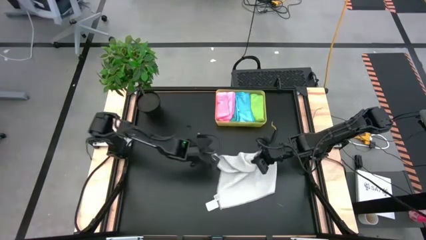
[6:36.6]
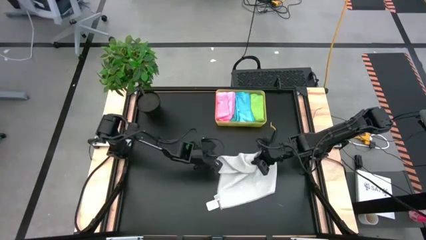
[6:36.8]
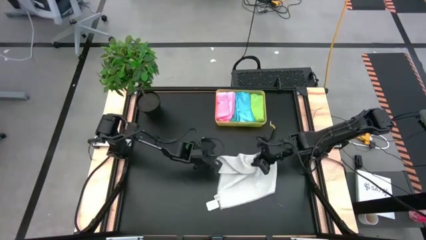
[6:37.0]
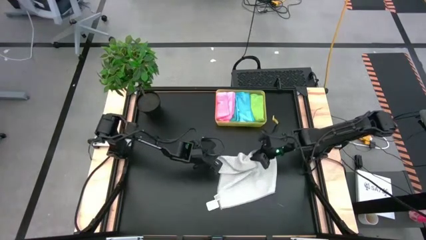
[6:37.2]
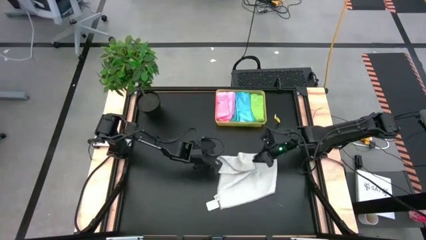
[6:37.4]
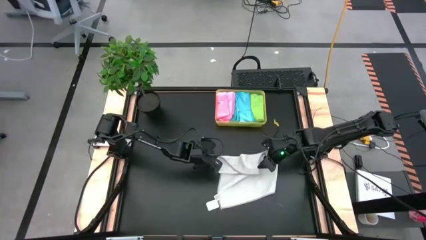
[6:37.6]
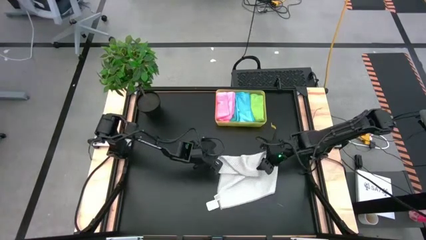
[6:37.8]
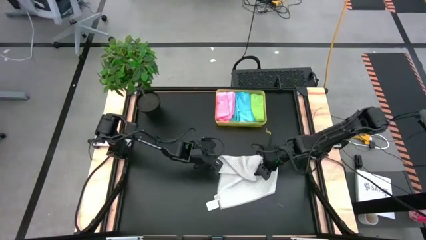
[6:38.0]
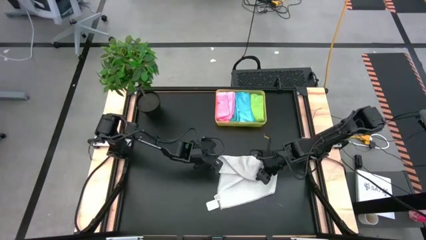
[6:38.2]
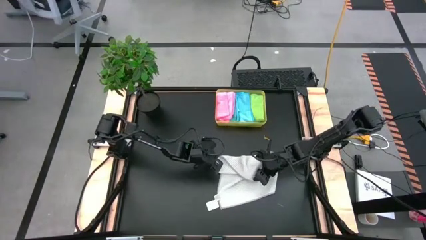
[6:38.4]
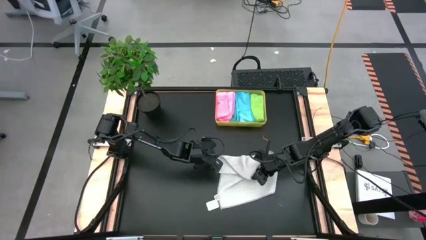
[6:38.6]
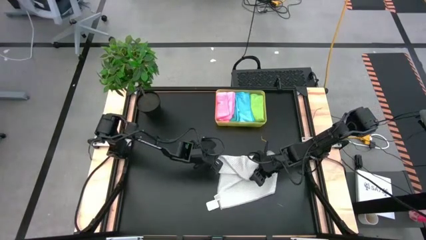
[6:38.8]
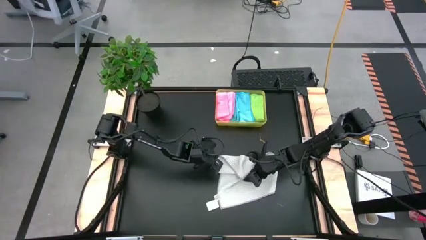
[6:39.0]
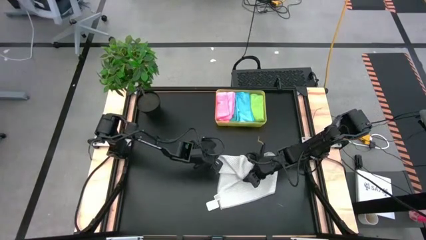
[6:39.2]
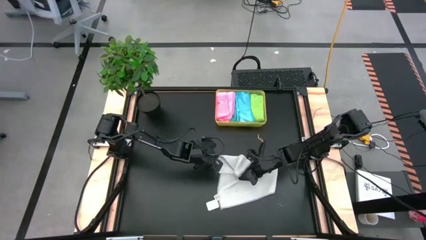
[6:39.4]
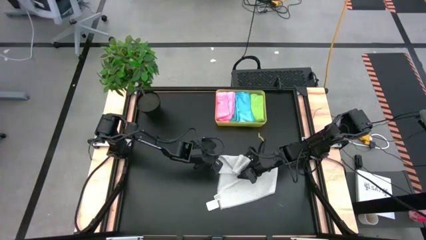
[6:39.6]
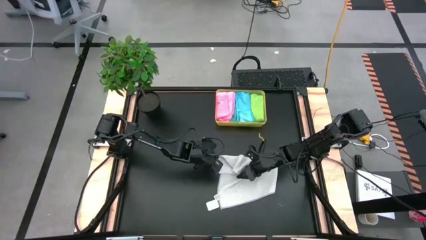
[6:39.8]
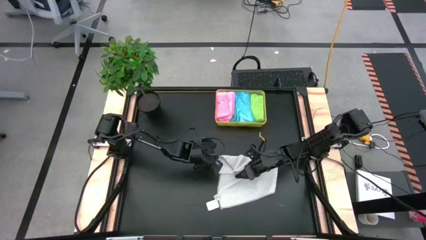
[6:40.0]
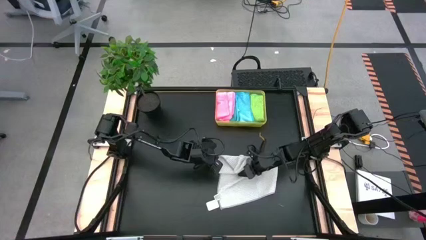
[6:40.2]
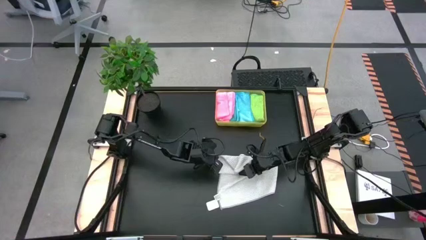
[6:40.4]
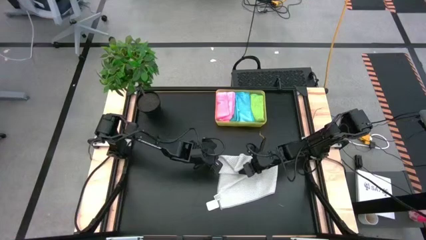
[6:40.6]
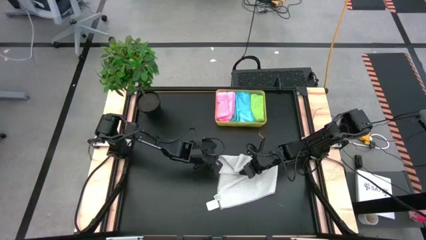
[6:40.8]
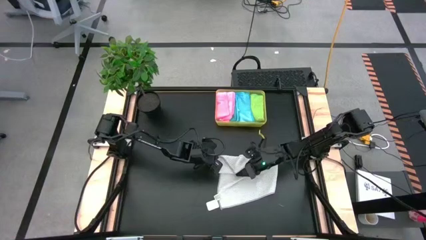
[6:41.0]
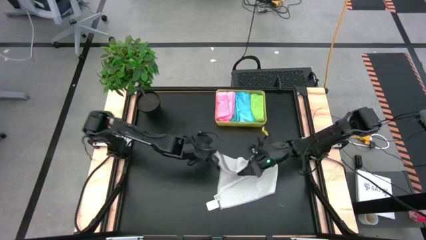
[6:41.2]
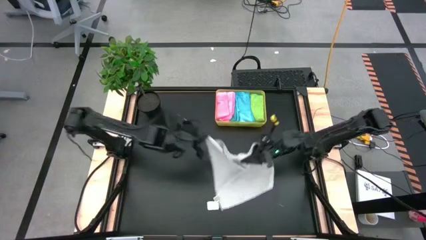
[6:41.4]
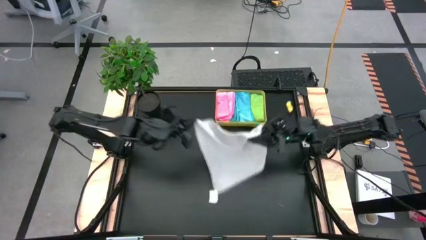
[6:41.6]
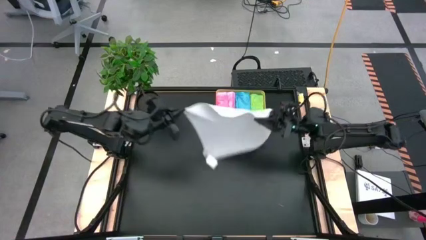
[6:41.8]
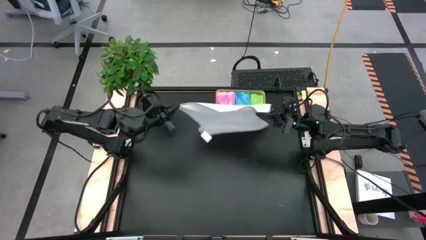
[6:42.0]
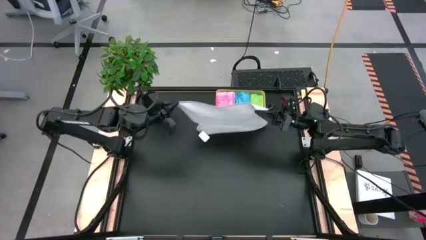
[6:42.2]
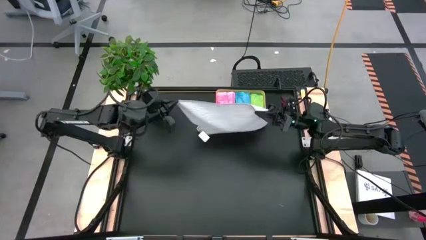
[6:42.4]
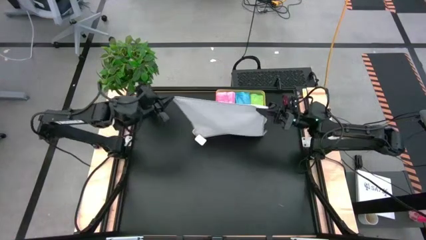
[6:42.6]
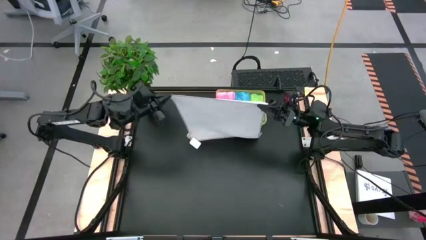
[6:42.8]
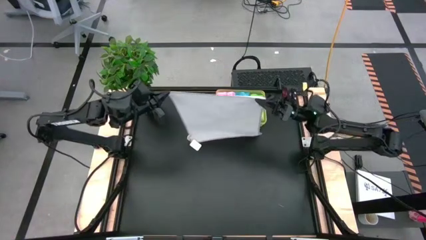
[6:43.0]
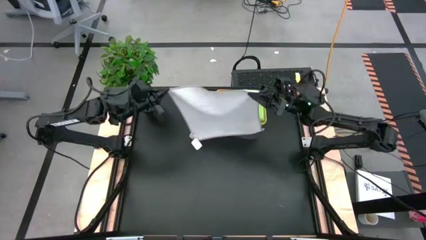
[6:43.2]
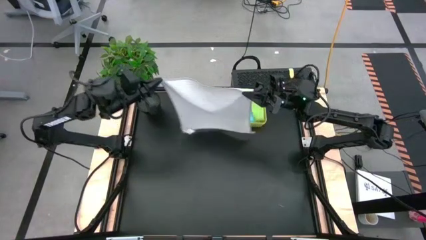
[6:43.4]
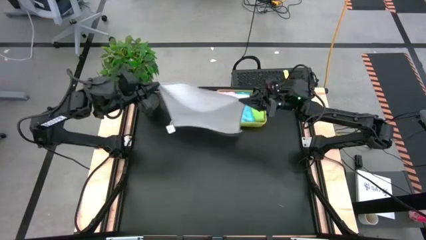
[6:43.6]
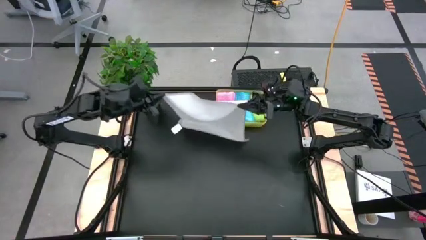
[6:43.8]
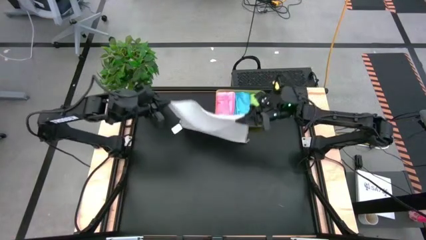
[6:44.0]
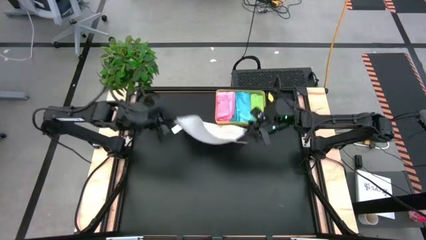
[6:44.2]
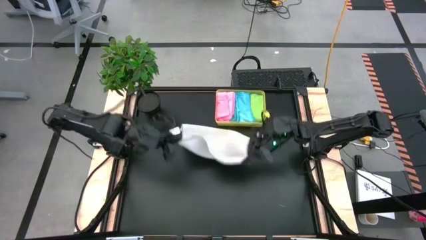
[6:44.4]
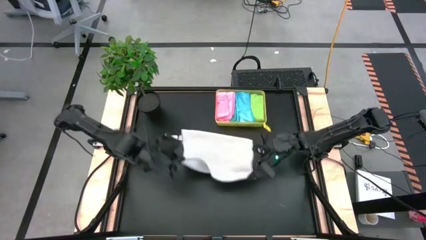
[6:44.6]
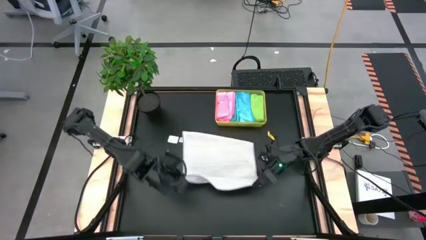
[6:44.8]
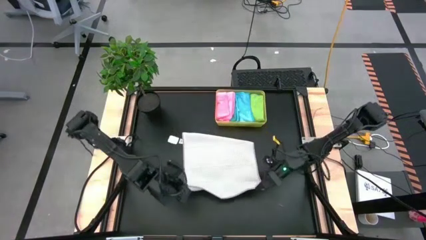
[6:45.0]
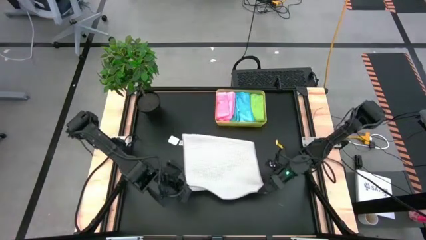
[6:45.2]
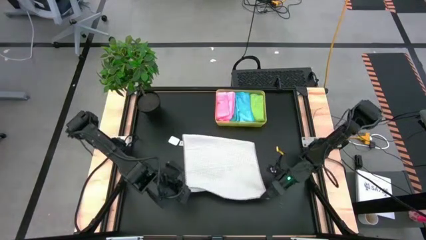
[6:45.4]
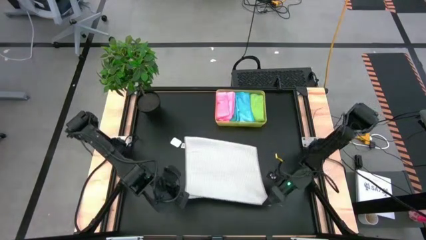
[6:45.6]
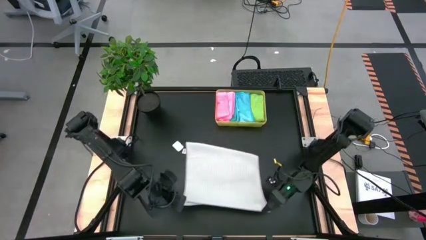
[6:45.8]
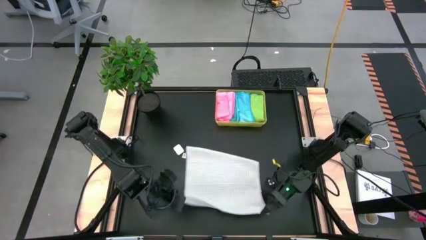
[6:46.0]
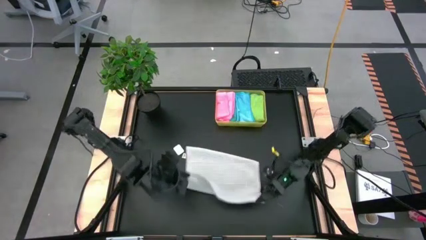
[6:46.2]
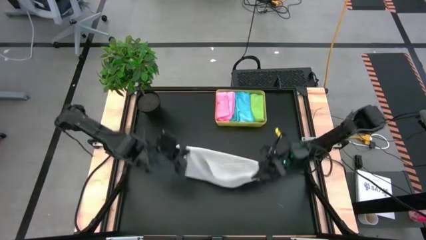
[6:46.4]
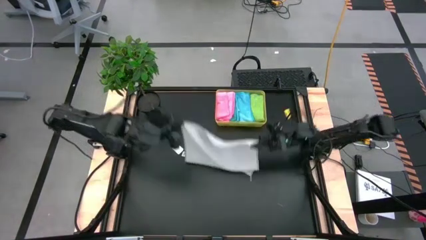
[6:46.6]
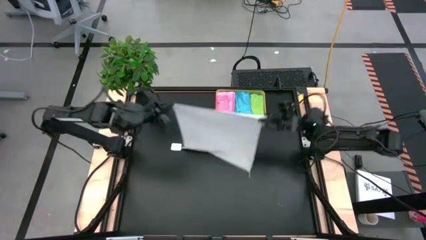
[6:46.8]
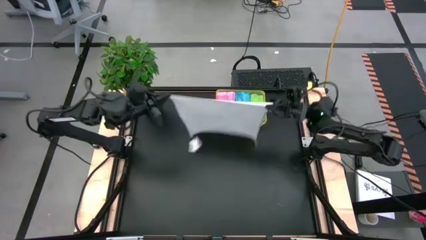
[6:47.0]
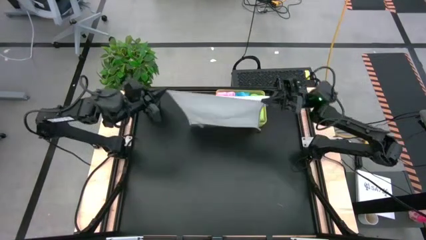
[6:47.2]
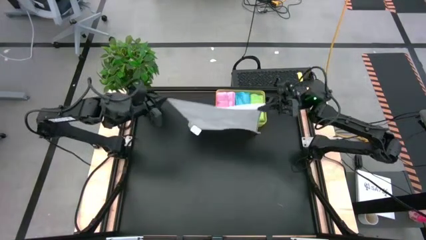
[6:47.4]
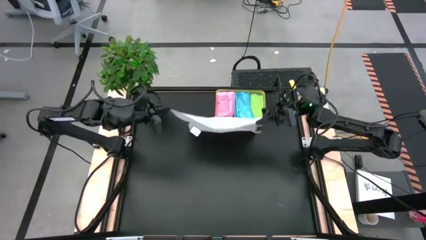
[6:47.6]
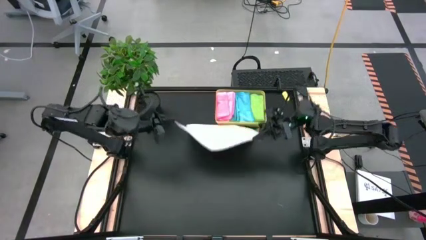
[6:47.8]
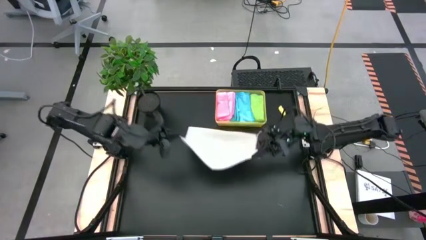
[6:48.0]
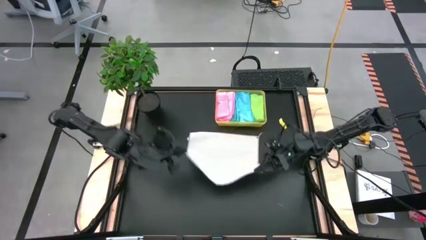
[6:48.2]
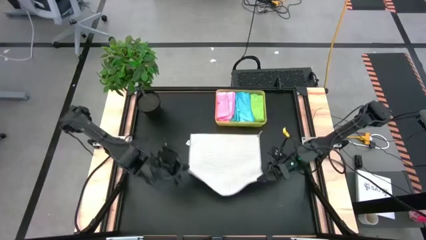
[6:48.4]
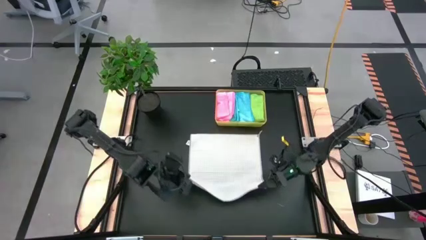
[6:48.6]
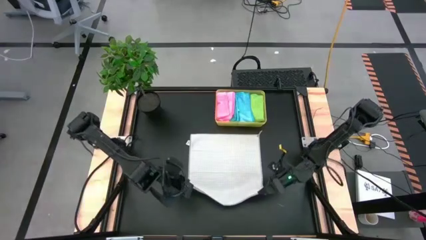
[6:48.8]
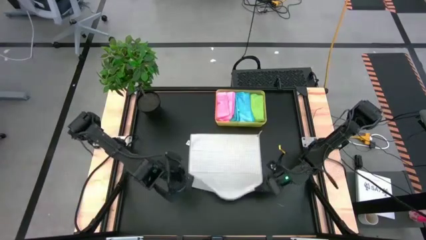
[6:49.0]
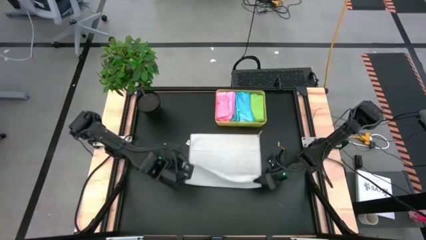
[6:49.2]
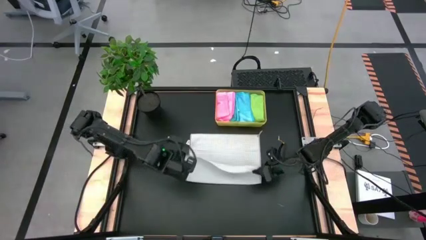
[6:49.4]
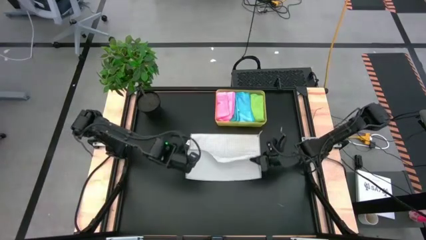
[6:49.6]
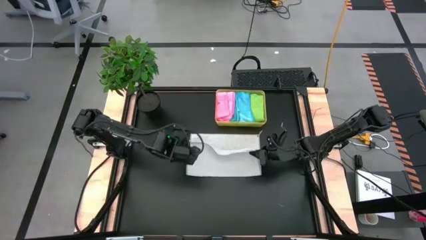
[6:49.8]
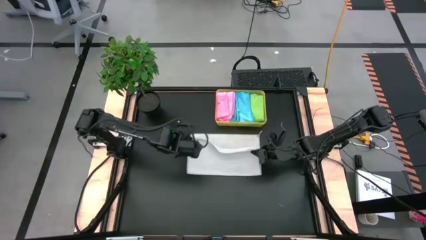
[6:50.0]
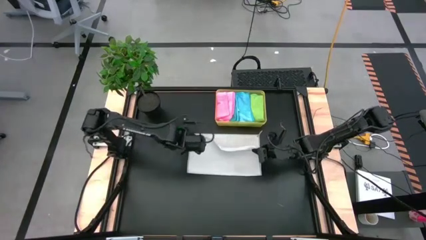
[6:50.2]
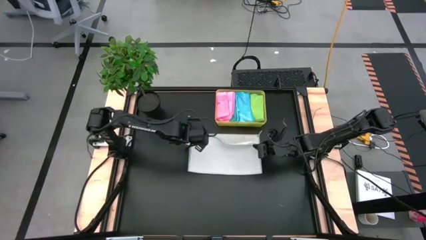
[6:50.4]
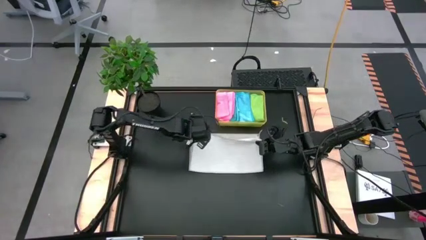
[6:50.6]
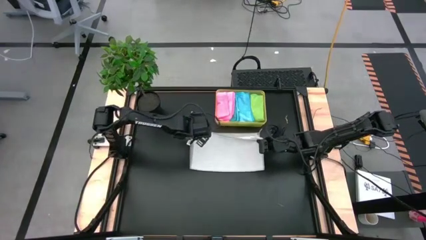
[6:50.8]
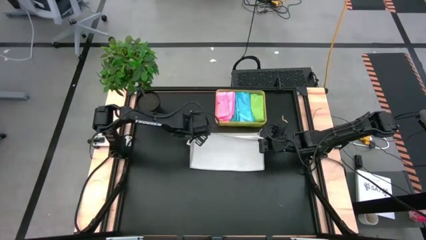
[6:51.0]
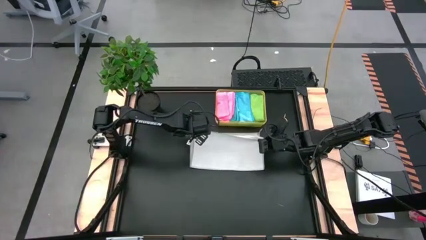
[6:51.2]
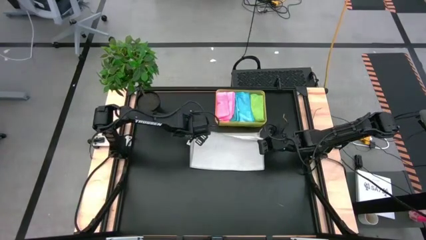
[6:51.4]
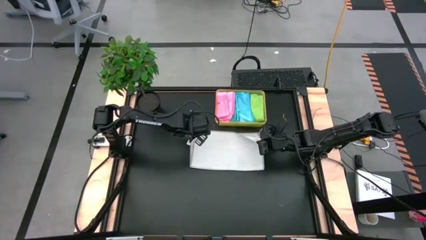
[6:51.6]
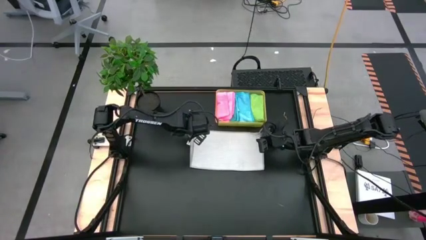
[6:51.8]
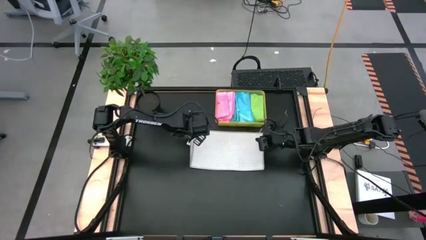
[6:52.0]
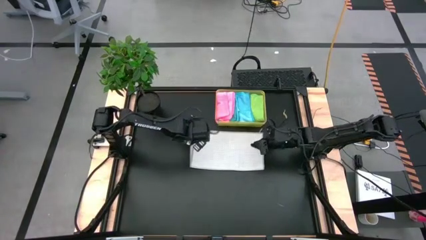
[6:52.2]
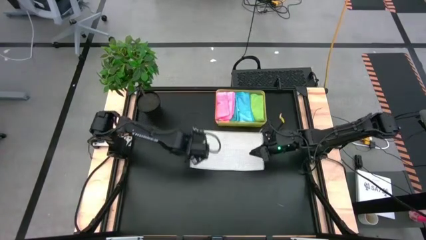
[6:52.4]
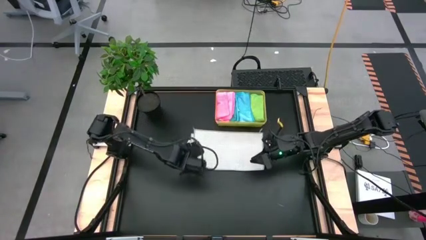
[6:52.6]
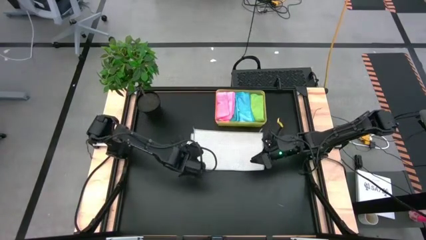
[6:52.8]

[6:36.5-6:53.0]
Task: Fold microfiber towels
Fold the white microfiber cloth
